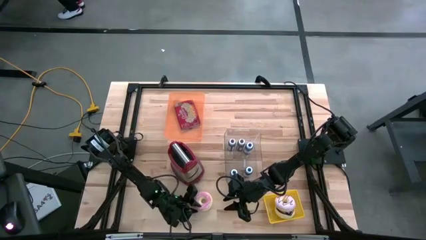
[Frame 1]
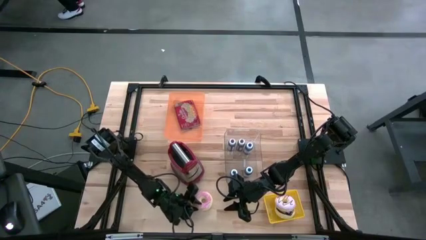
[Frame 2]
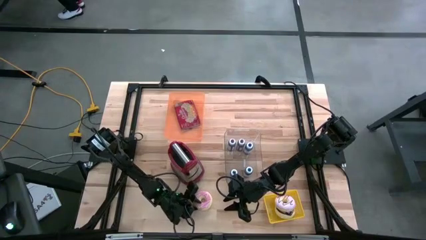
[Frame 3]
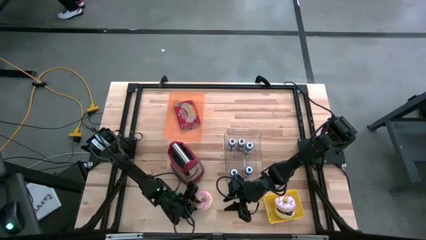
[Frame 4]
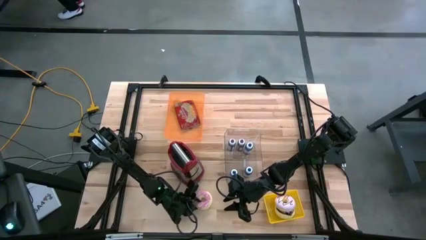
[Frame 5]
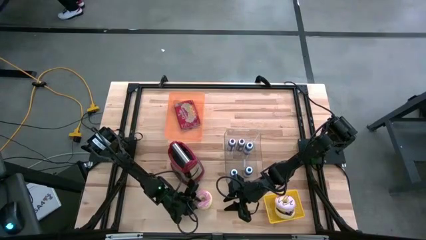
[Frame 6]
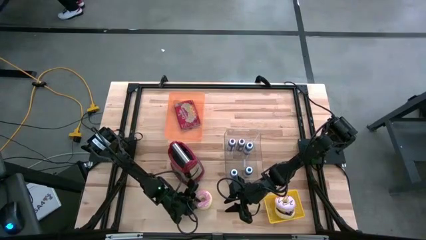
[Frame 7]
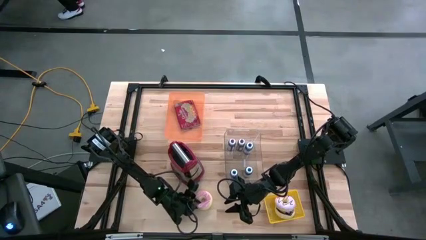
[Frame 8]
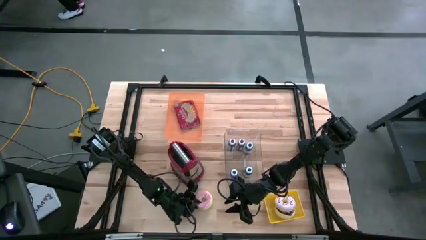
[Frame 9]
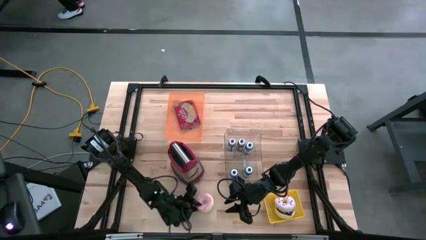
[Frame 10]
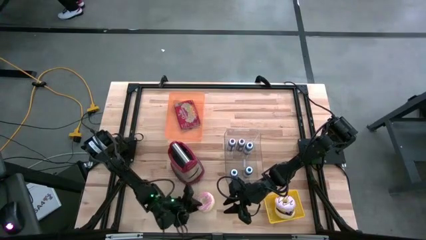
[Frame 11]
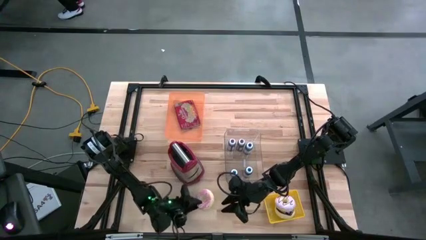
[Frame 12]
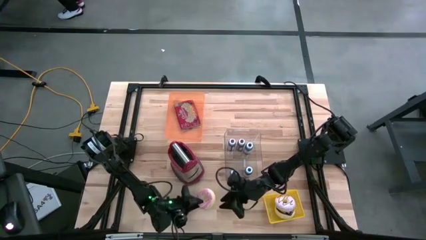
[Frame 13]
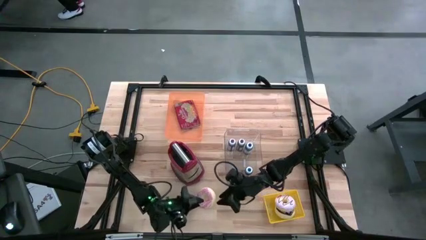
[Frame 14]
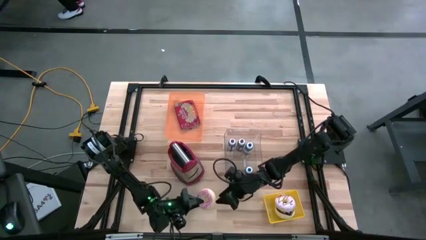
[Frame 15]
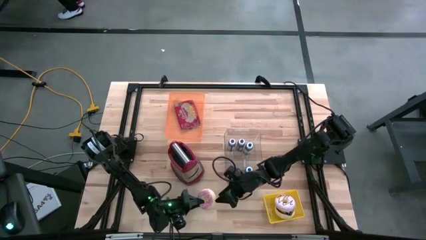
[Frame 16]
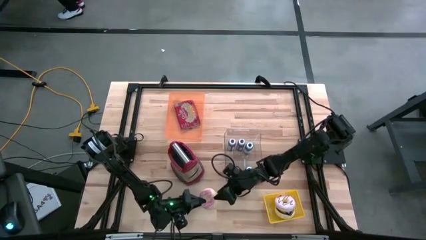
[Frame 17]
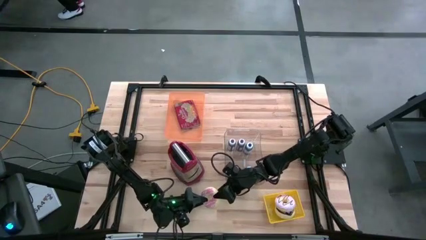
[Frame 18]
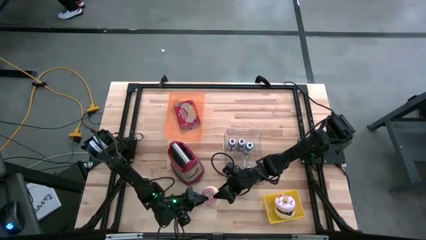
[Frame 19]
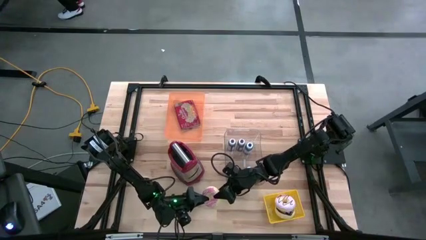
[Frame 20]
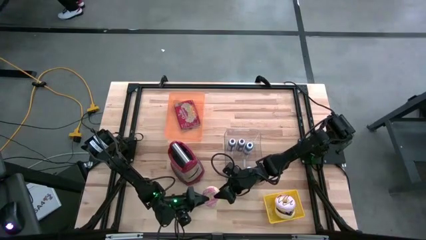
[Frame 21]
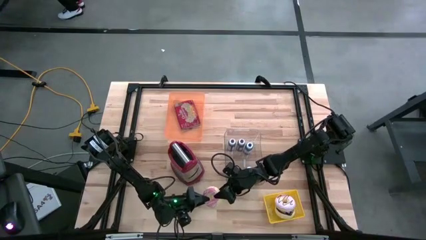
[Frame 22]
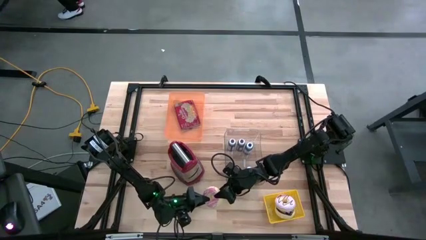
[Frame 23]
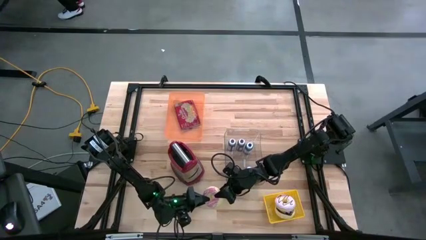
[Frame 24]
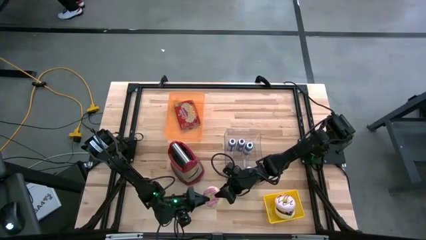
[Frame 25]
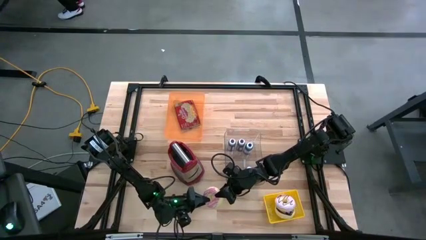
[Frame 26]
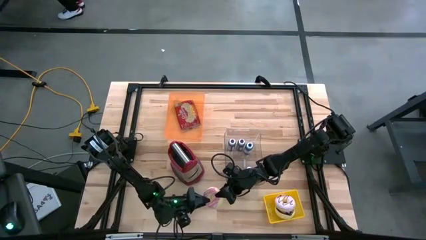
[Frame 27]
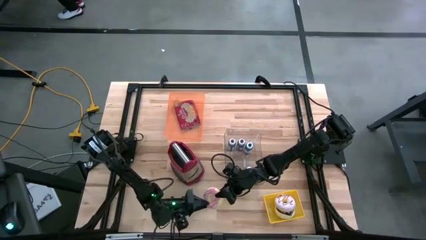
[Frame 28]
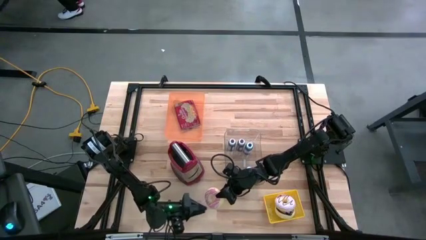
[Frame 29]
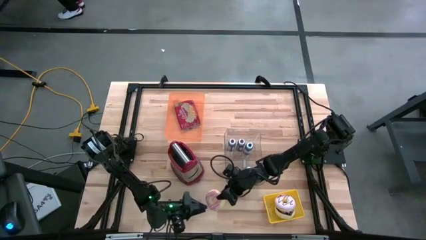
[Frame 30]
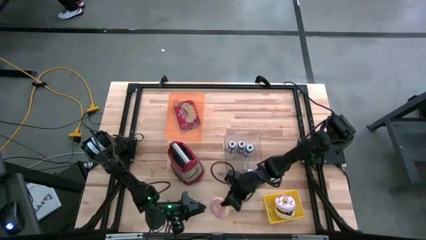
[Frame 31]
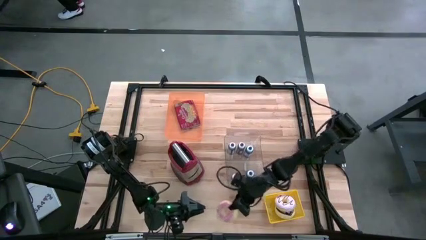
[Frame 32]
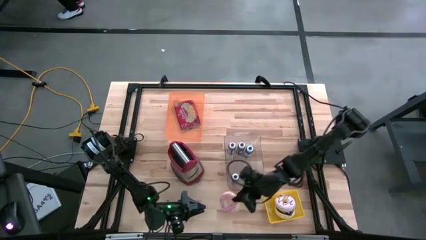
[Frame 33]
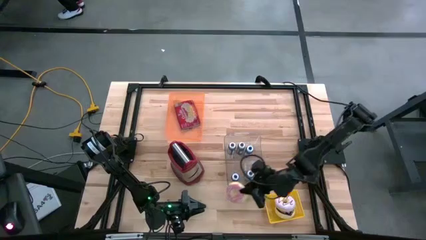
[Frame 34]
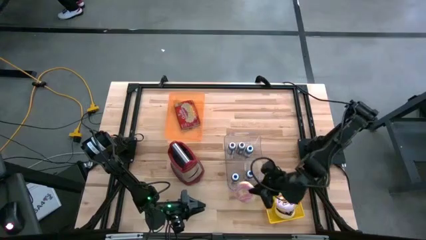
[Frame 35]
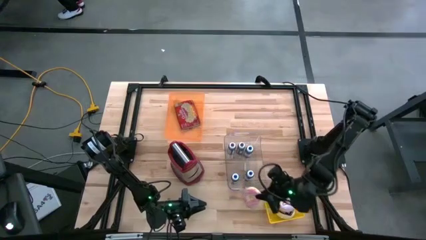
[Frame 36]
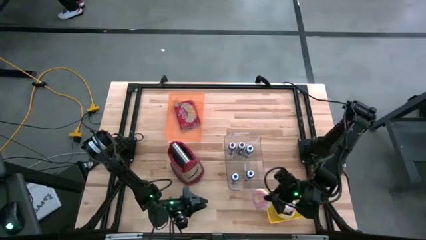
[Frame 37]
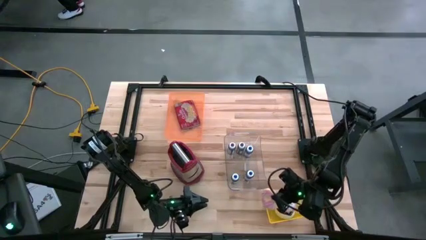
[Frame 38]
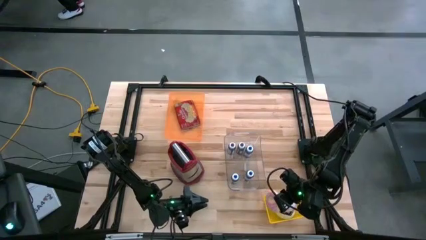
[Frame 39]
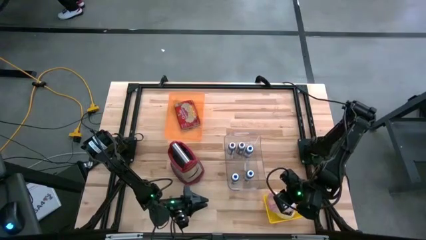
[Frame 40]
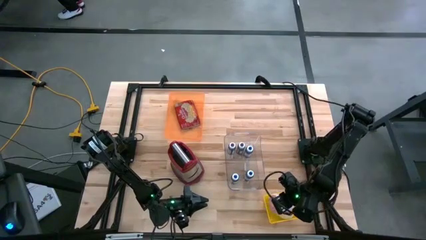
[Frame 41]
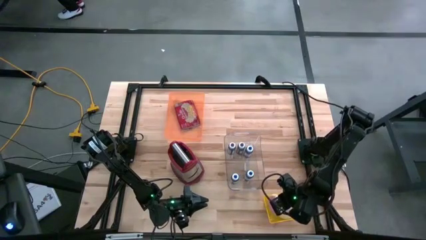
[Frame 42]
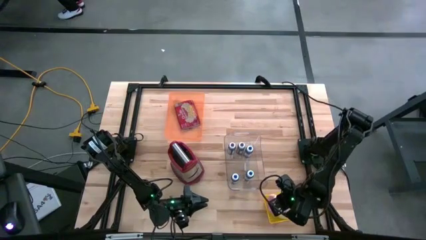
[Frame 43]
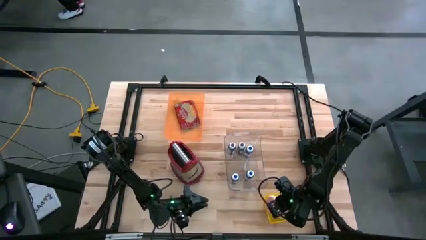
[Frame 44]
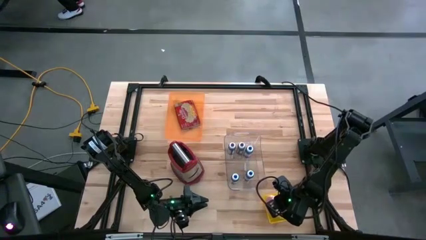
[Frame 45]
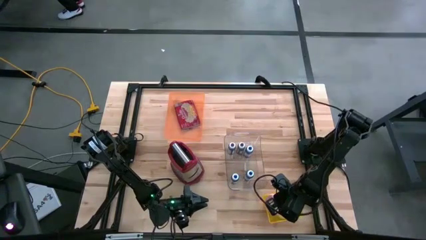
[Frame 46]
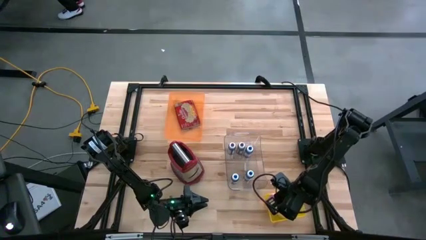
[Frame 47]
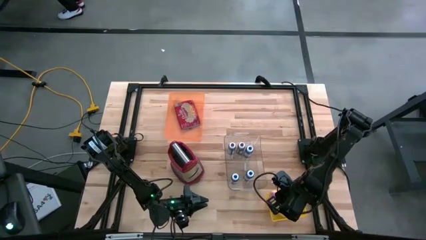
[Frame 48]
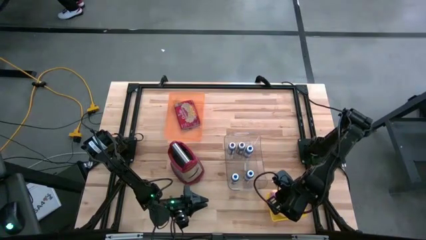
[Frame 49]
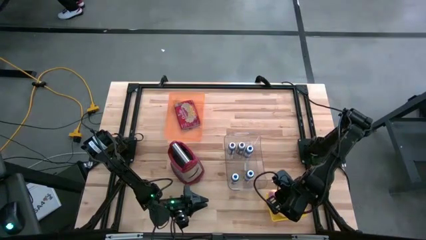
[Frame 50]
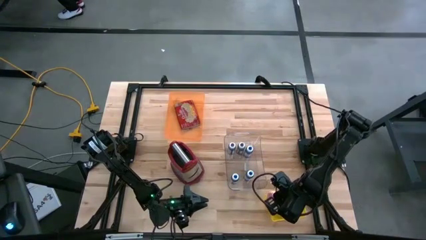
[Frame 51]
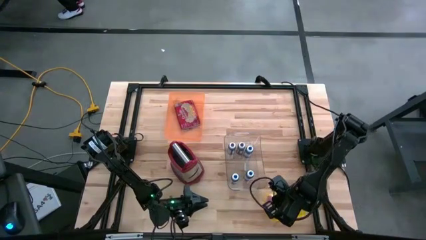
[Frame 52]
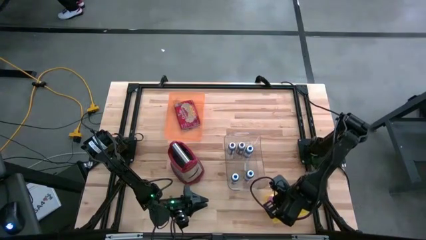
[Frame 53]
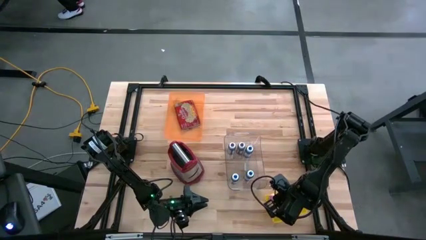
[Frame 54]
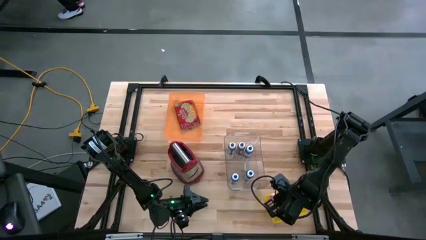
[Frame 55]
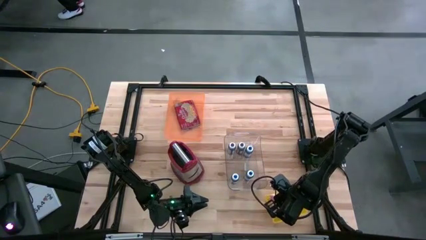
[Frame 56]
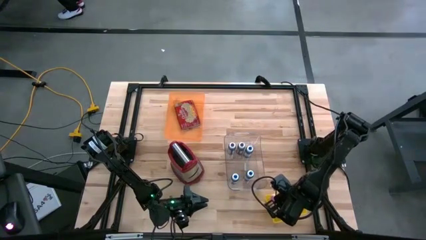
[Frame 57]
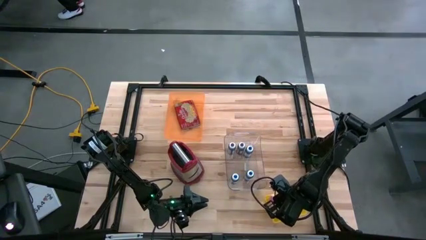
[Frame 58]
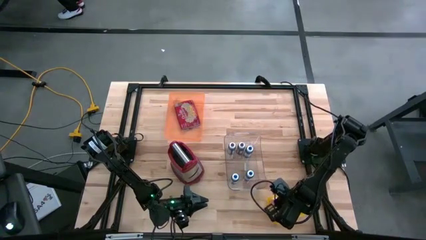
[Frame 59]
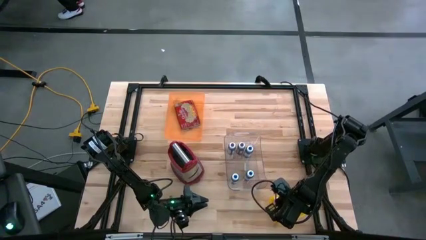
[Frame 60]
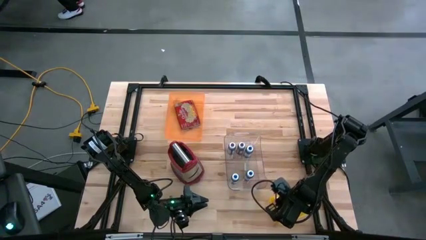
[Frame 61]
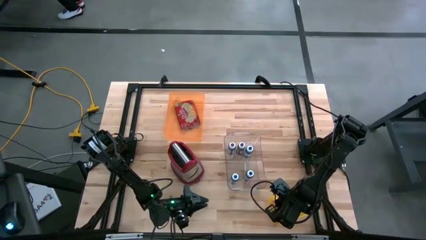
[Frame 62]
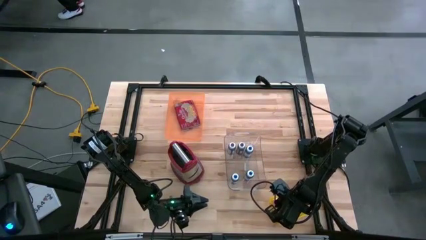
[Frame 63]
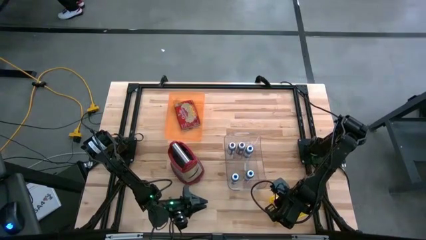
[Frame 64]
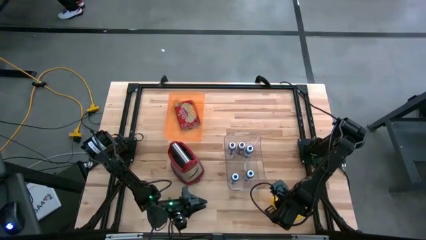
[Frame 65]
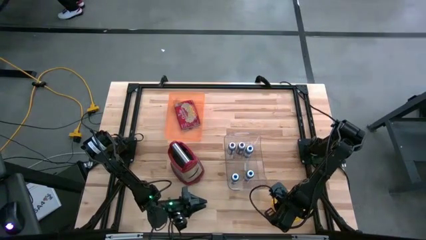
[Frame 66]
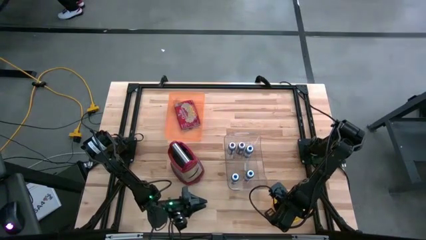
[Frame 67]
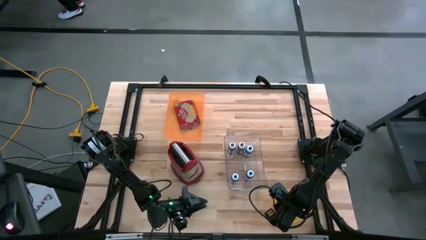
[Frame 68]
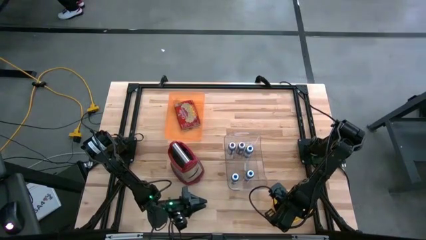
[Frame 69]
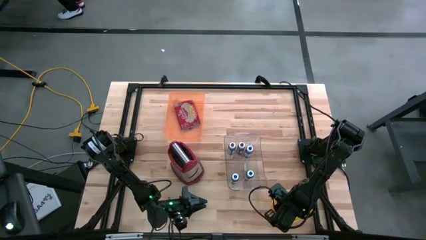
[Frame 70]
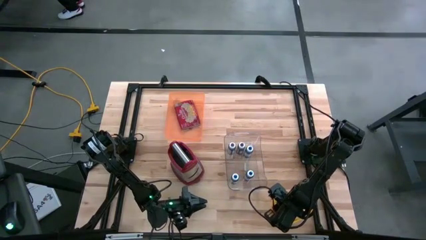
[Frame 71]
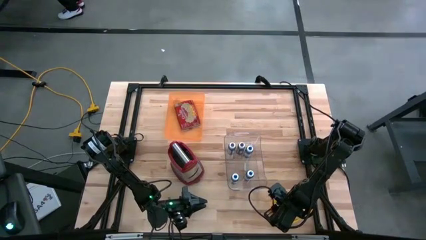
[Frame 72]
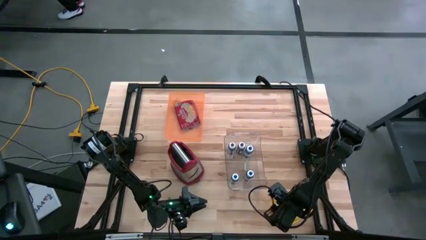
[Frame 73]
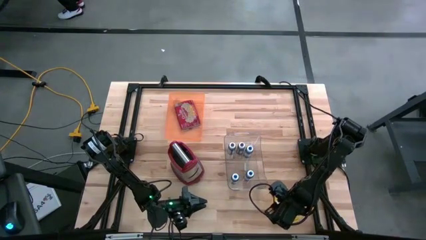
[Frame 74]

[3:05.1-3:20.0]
Task: Pick & Place Food Item
Put the pink donut into the yellow bin
